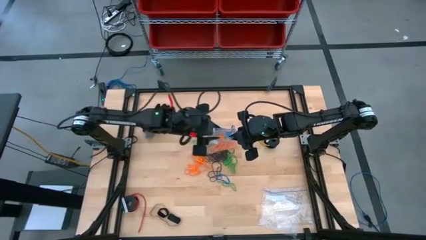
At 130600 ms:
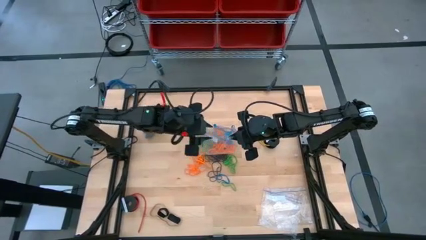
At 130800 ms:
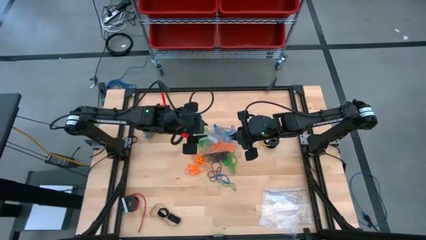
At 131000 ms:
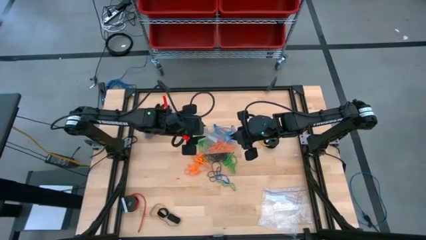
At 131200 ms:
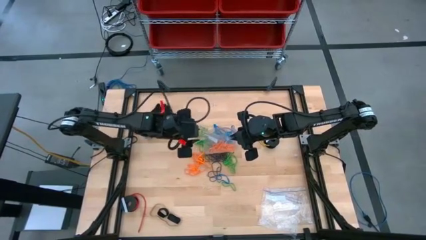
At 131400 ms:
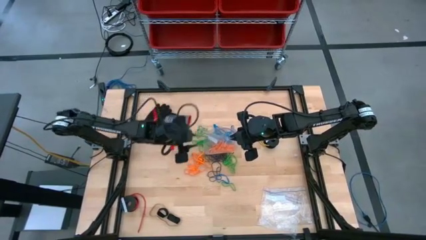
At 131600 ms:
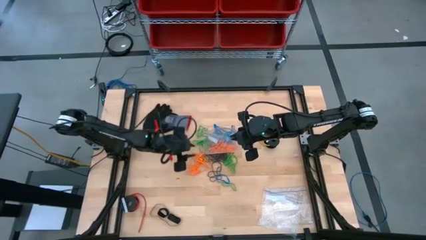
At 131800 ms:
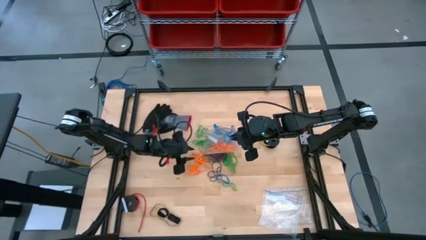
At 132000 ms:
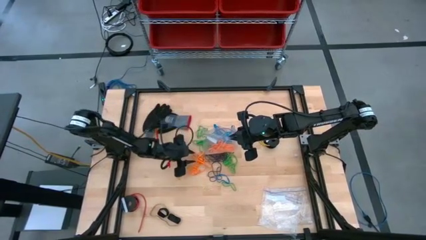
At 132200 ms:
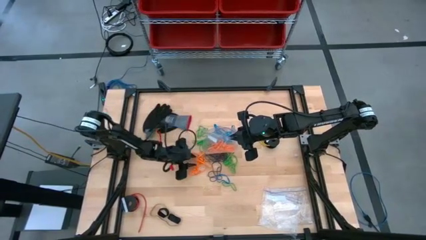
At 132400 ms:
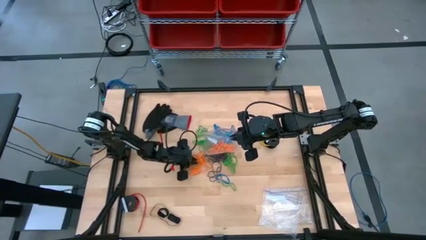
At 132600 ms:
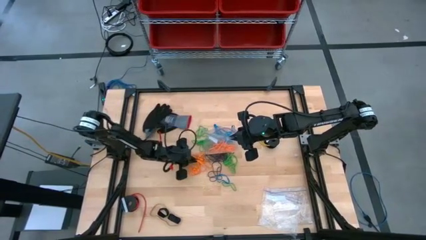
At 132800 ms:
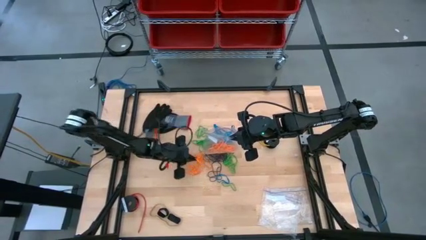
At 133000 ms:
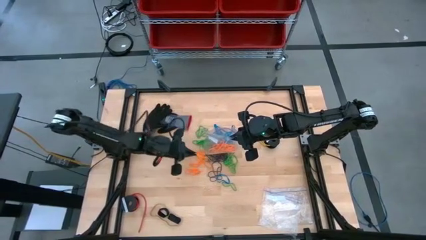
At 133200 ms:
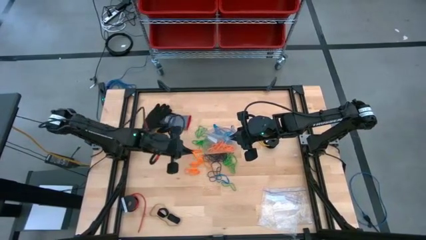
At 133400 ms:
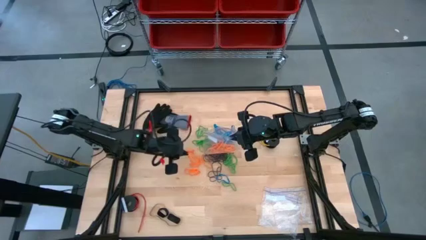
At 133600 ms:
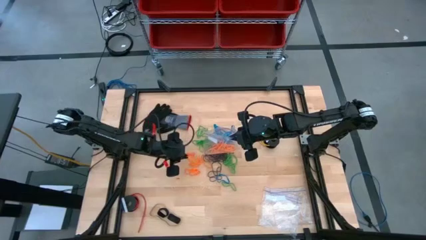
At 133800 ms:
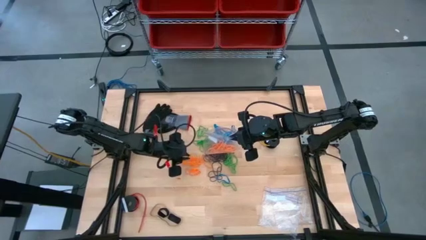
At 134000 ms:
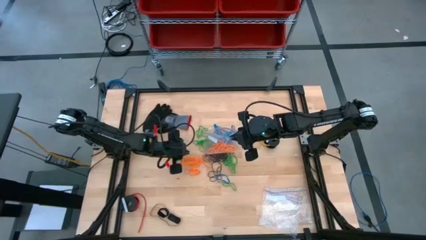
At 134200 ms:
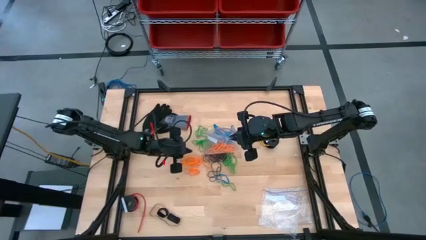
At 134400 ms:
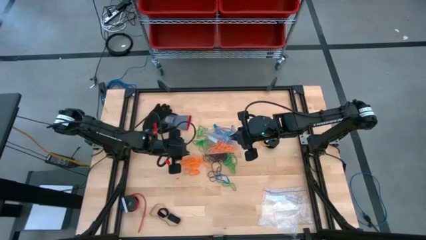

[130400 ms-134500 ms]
Task: Sort rubber bands
Put the orange rubber band into the transparent zip bag

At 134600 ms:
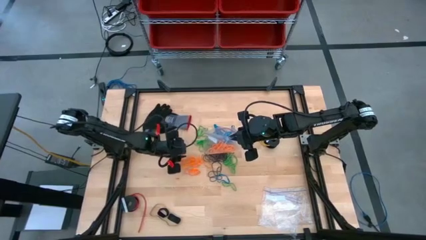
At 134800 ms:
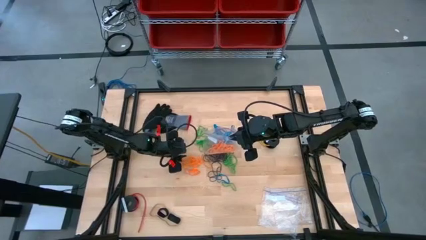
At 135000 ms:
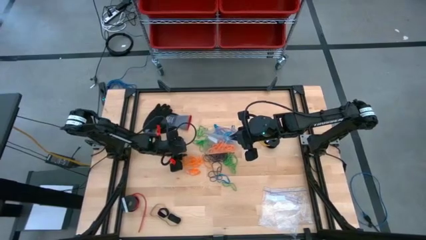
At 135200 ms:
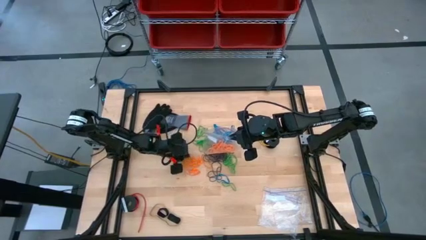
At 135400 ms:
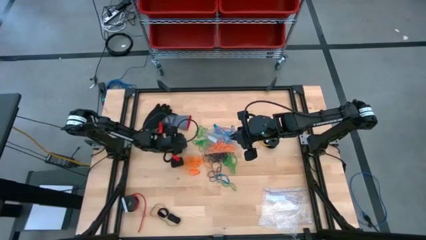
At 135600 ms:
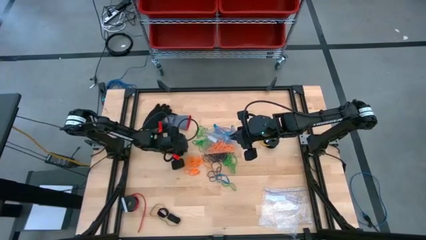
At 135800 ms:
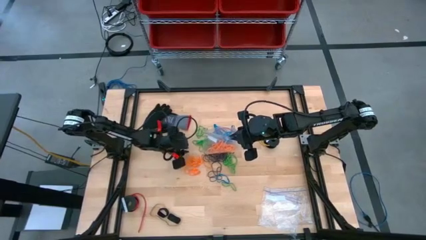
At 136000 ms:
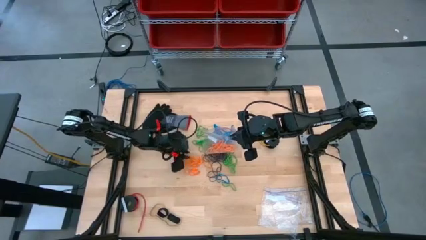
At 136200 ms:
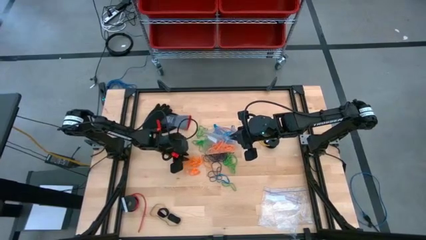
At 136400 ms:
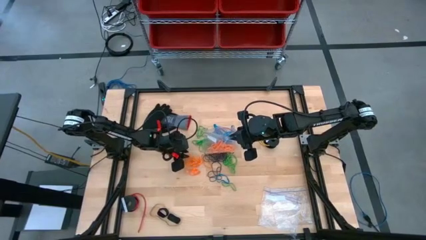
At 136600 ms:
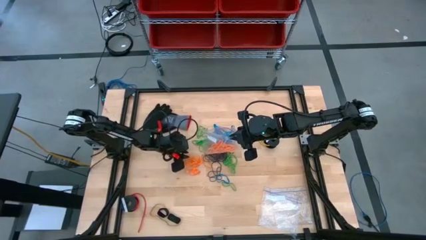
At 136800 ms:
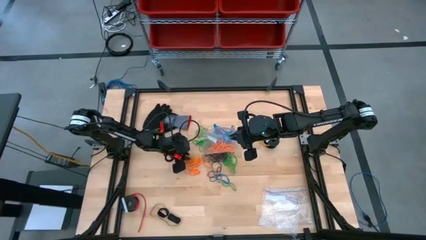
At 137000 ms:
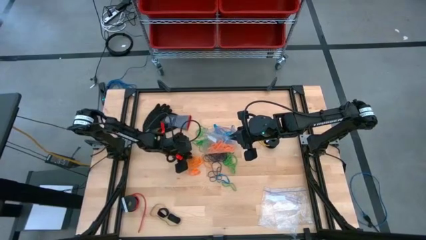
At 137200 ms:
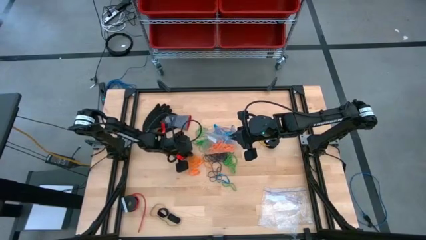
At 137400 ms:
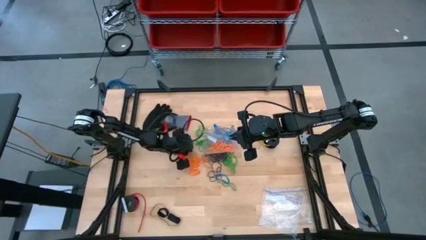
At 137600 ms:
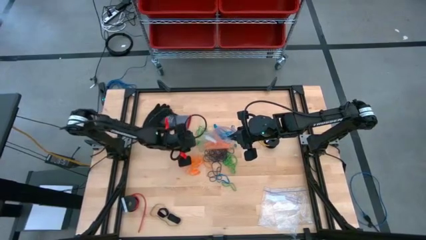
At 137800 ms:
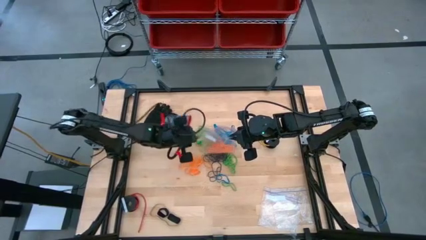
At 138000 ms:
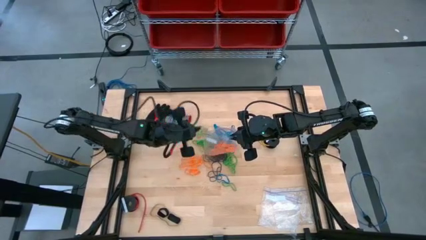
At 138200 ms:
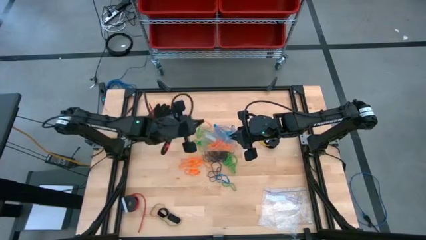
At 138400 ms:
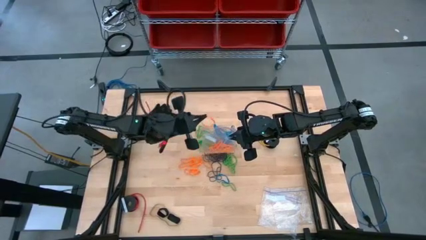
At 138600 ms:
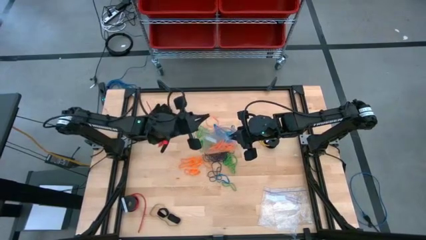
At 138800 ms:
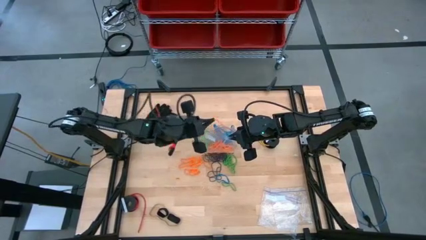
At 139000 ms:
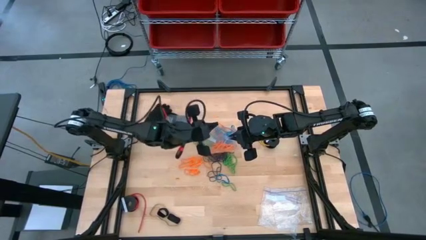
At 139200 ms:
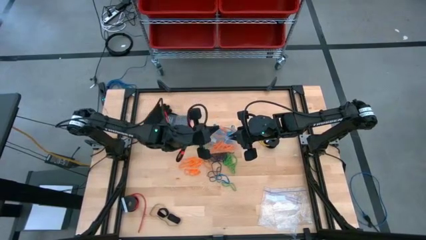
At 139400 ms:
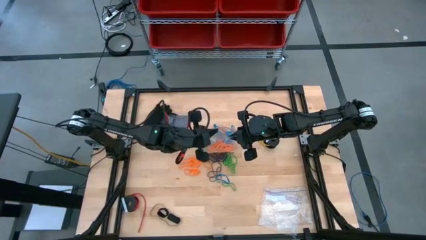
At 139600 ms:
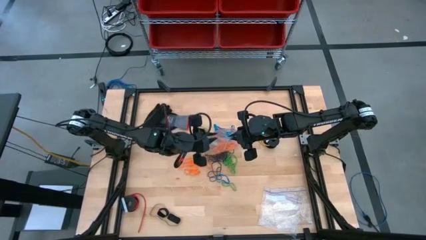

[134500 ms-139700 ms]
Put the orange rubber band into the transparent zip bag

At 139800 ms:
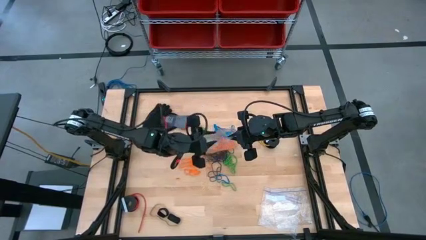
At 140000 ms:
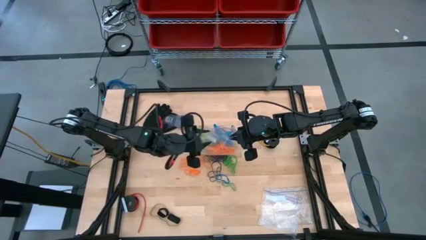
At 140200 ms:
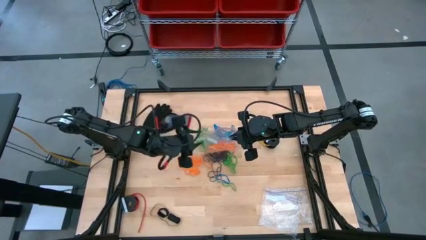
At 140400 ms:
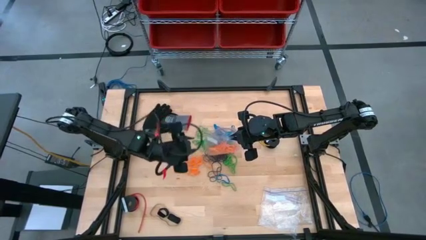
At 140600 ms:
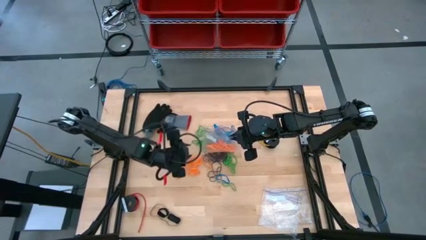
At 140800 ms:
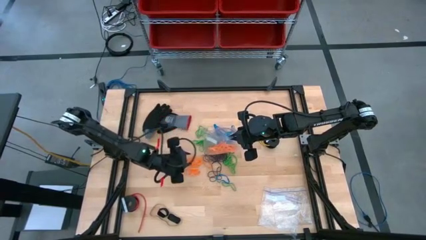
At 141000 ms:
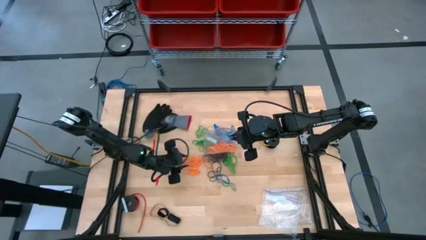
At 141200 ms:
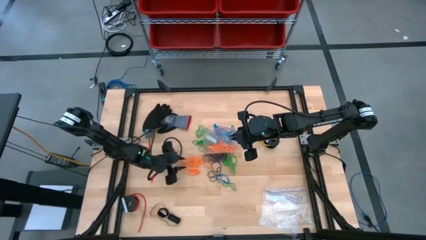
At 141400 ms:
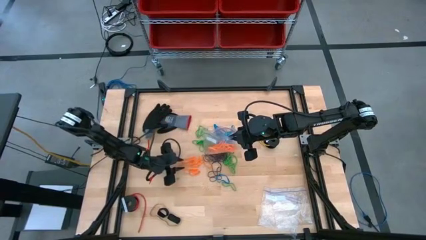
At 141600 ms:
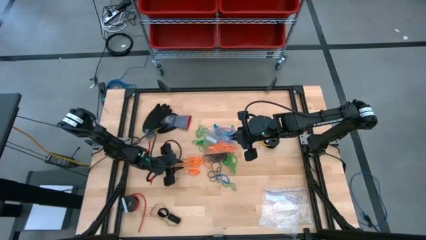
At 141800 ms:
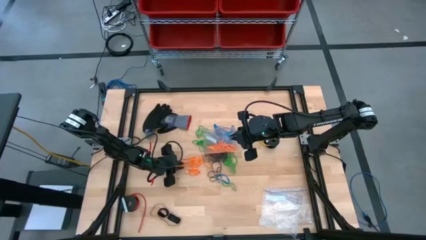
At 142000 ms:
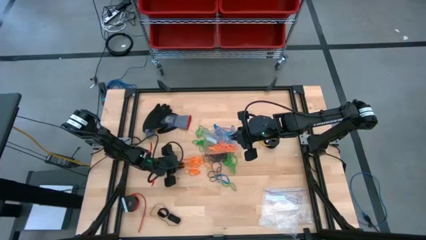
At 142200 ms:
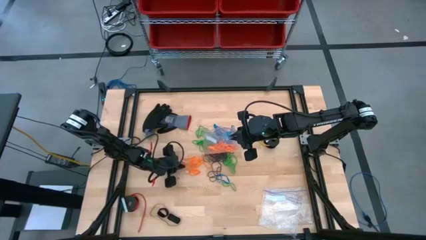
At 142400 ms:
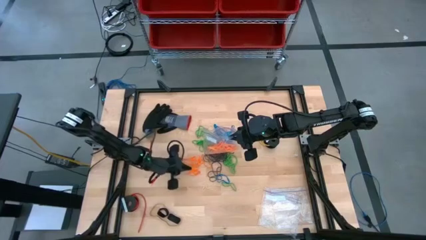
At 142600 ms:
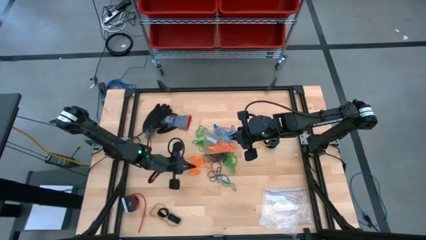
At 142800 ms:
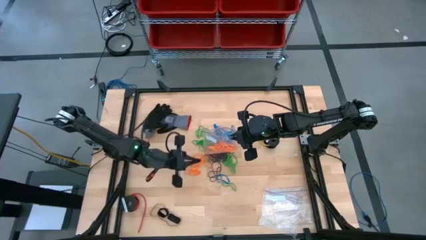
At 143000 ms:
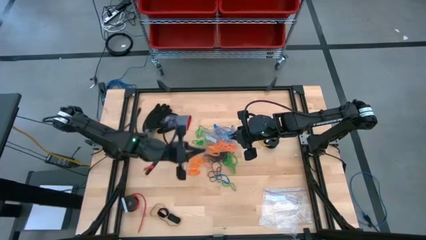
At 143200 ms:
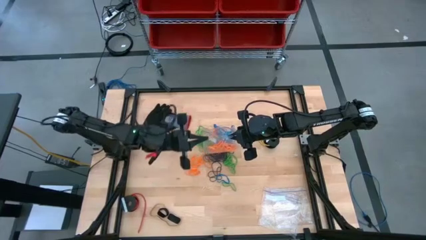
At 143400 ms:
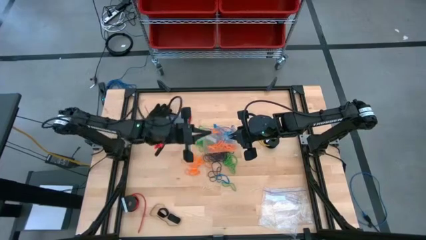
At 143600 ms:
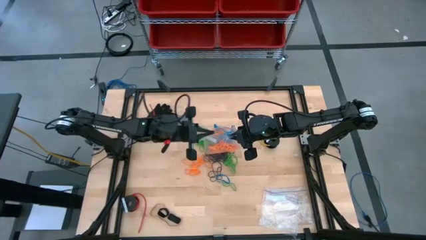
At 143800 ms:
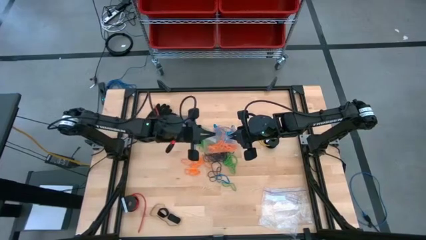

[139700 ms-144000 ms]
Put the orange rubber band into the transparent zip bag

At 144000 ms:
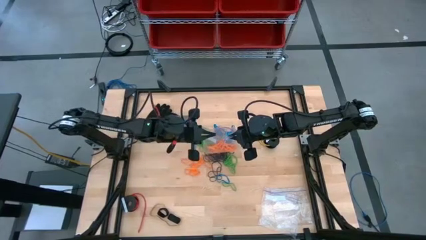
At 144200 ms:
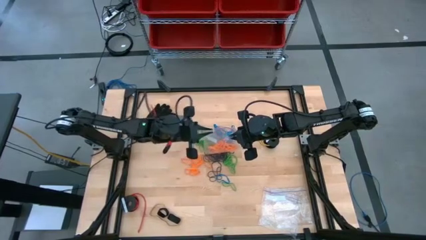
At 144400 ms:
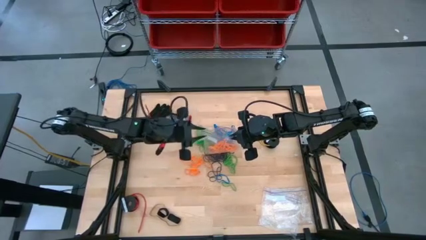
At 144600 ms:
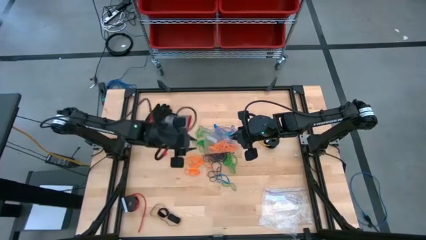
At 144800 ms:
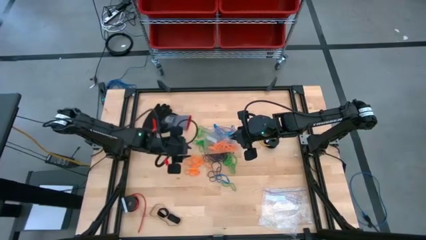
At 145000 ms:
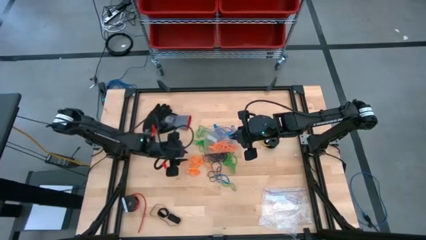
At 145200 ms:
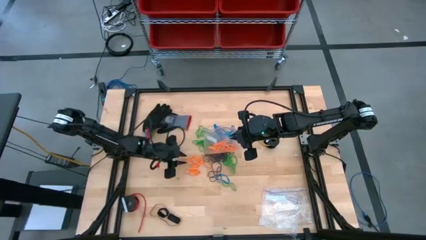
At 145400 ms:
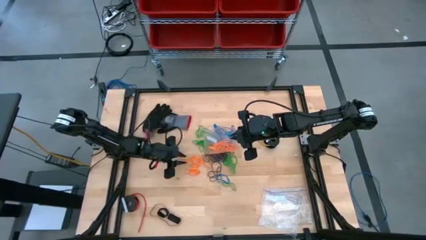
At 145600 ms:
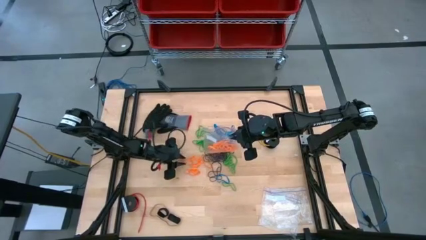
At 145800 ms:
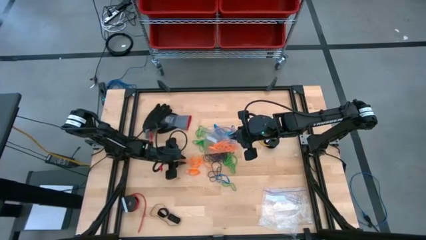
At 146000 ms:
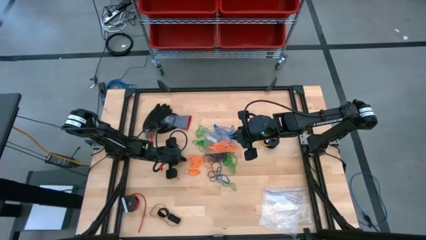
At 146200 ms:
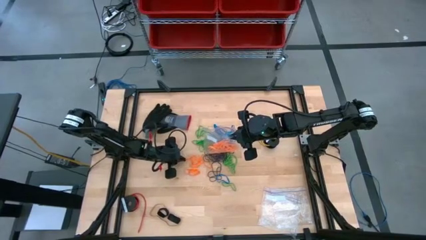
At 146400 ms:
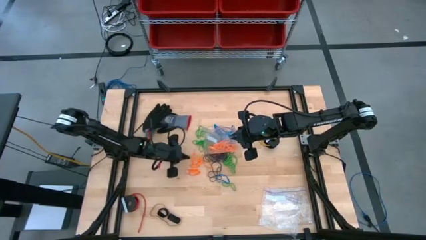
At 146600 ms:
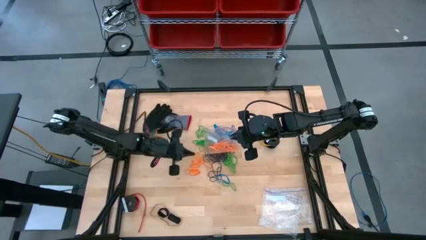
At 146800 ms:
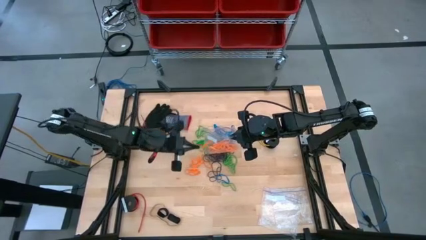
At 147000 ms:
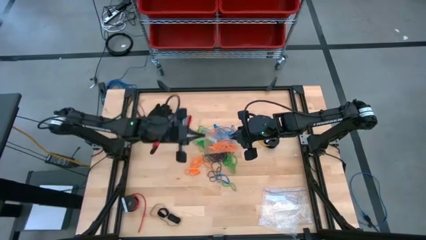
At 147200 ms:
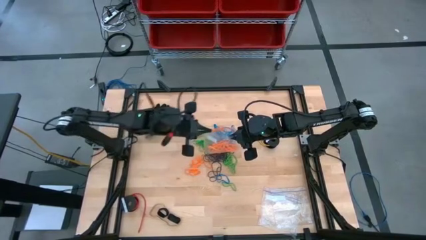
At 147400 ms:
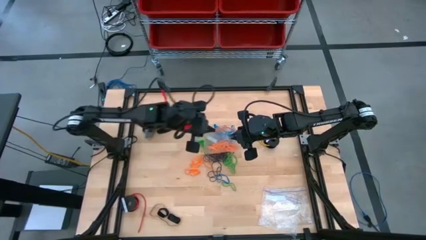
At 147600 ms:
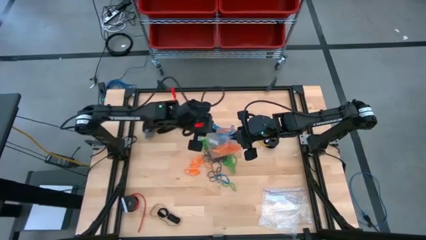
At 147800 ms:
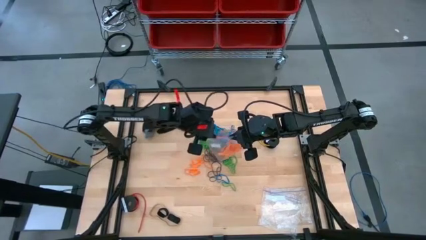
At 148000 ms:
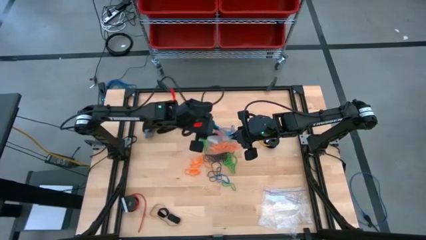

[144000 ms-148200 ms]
Put the orange rubber band into the transparent zip bag
